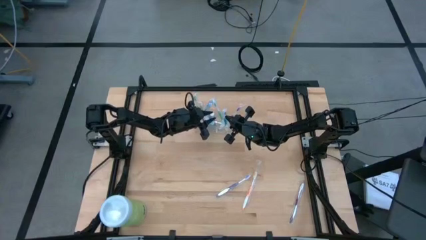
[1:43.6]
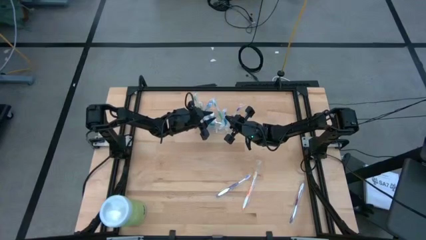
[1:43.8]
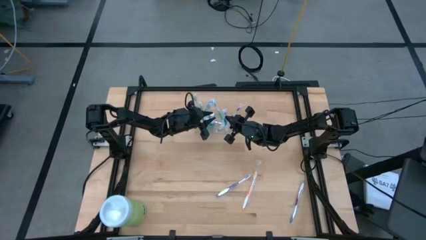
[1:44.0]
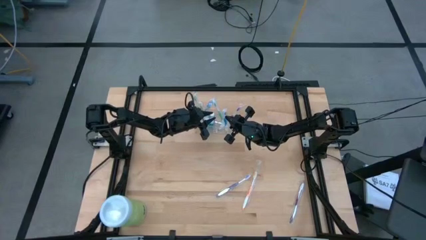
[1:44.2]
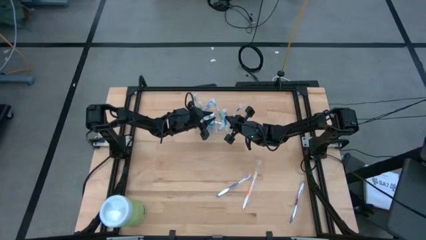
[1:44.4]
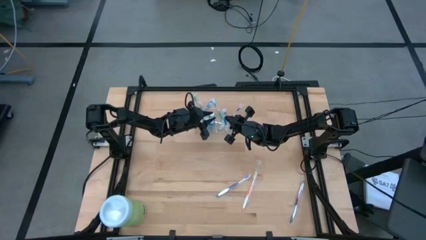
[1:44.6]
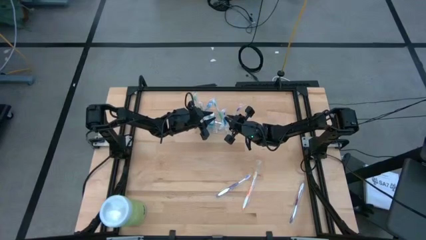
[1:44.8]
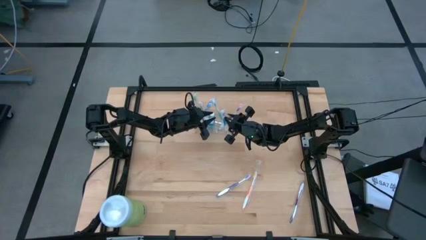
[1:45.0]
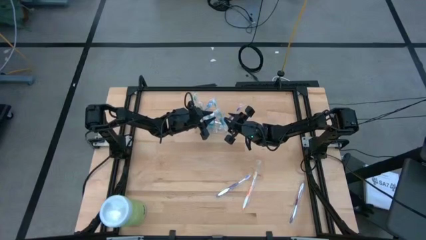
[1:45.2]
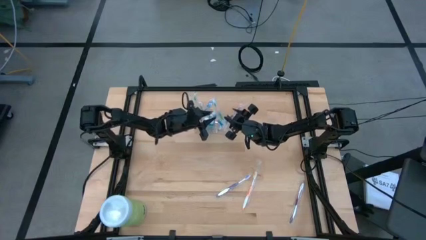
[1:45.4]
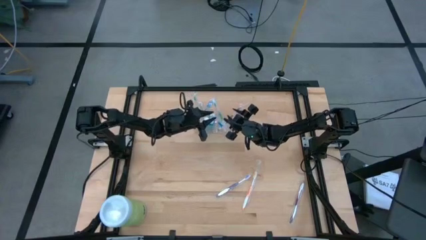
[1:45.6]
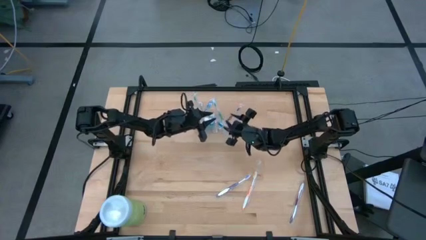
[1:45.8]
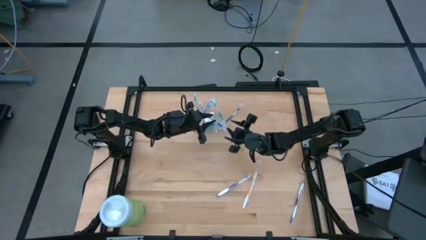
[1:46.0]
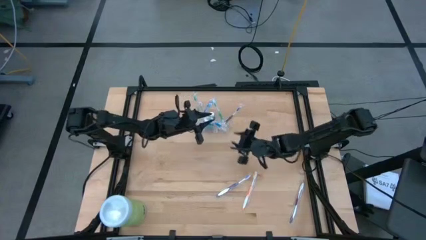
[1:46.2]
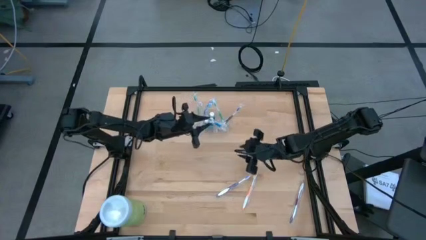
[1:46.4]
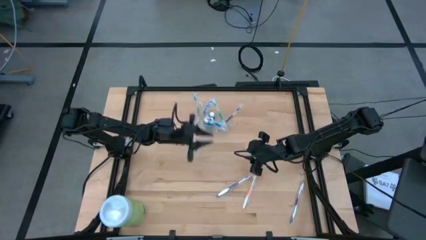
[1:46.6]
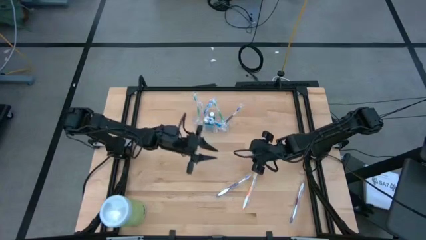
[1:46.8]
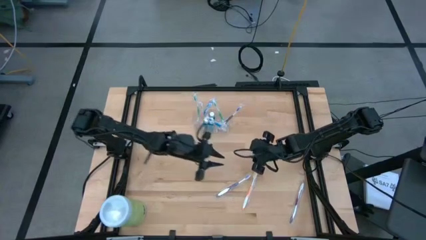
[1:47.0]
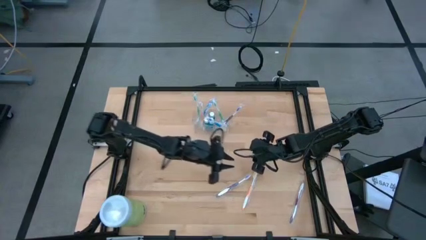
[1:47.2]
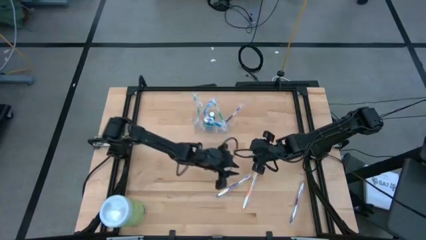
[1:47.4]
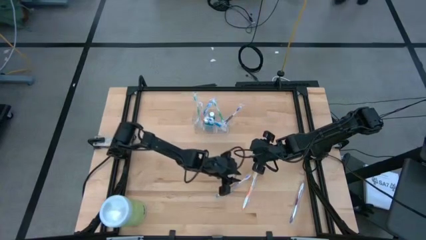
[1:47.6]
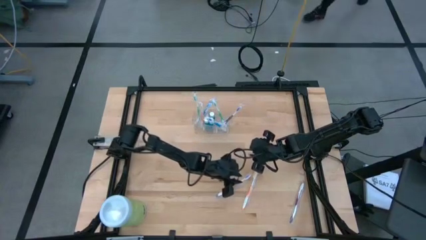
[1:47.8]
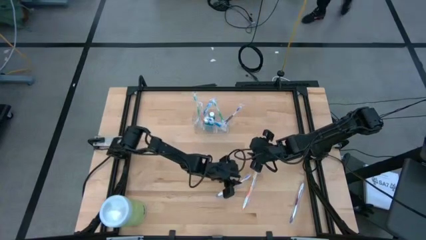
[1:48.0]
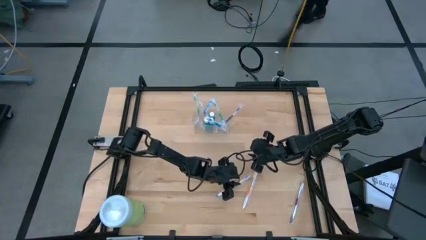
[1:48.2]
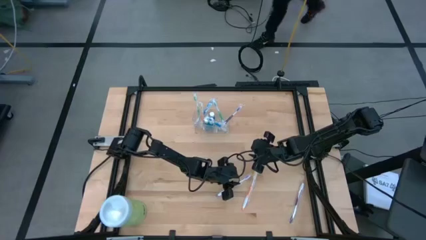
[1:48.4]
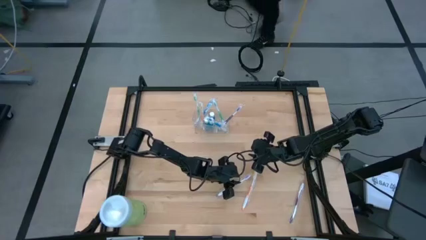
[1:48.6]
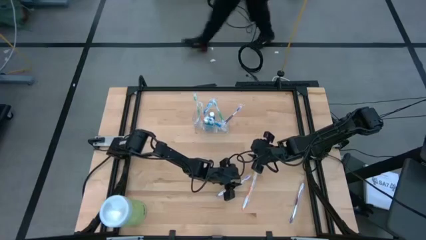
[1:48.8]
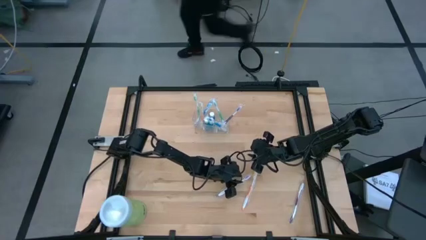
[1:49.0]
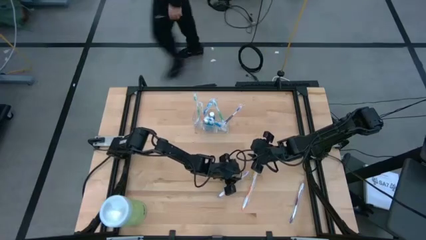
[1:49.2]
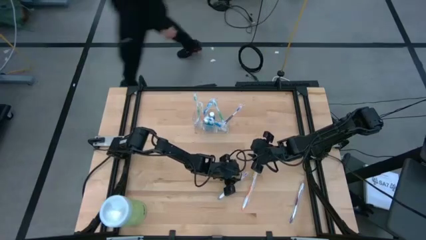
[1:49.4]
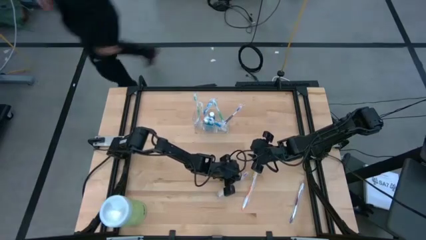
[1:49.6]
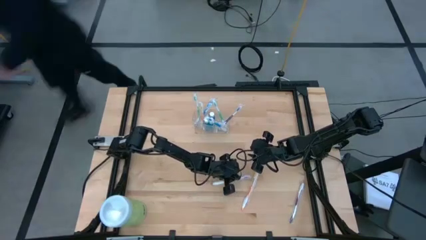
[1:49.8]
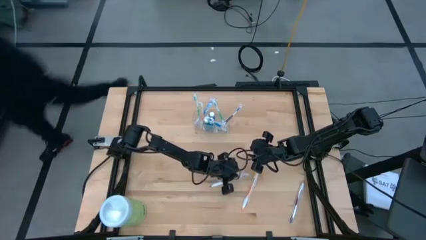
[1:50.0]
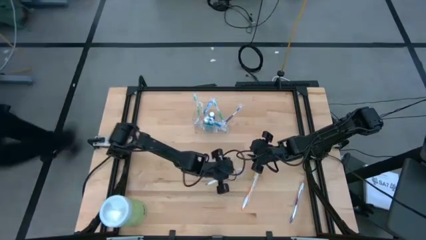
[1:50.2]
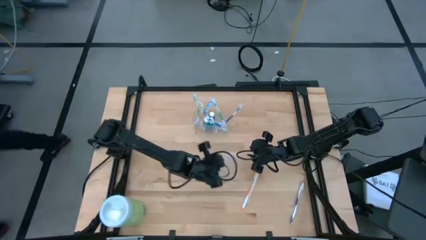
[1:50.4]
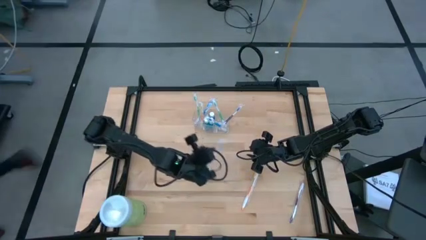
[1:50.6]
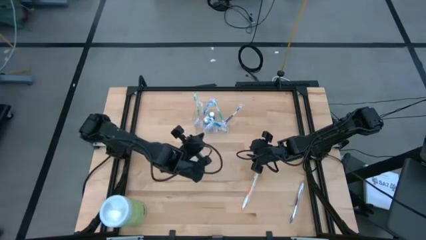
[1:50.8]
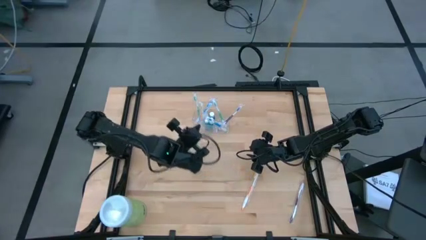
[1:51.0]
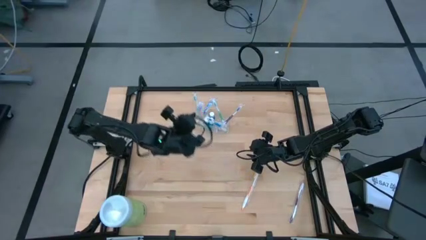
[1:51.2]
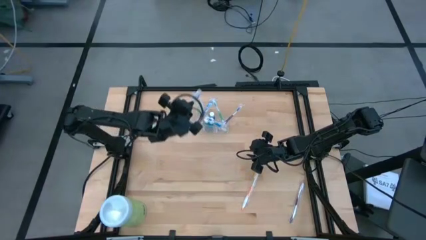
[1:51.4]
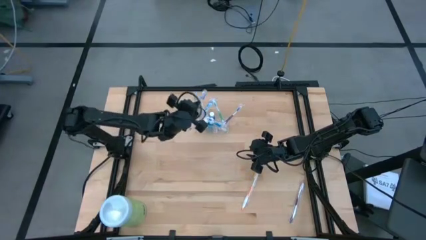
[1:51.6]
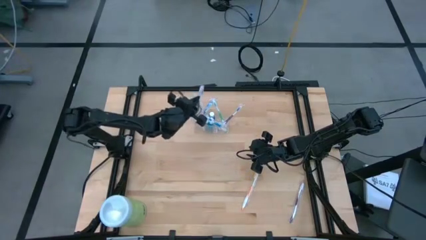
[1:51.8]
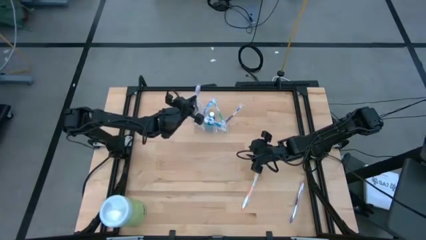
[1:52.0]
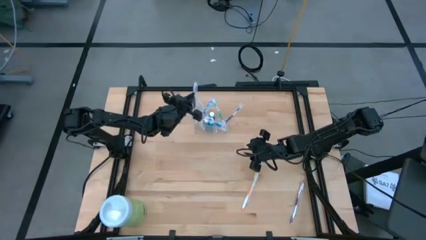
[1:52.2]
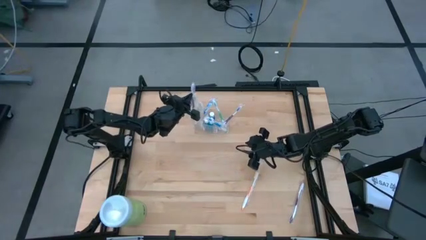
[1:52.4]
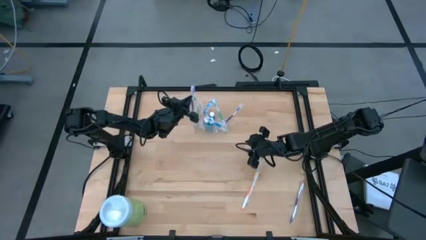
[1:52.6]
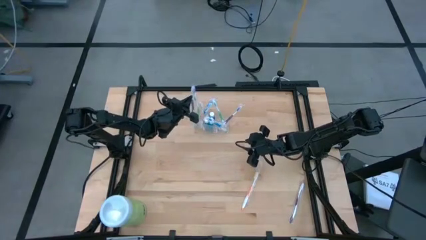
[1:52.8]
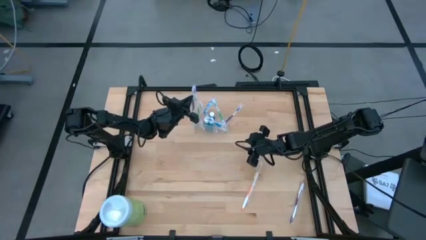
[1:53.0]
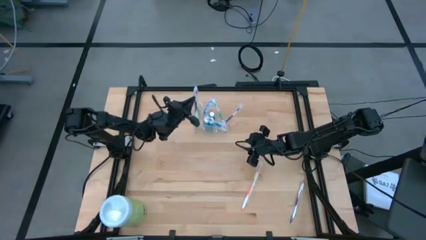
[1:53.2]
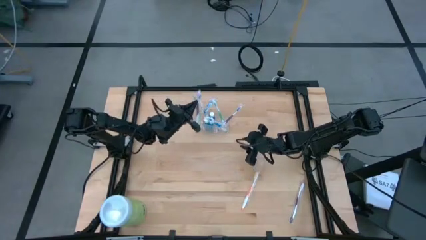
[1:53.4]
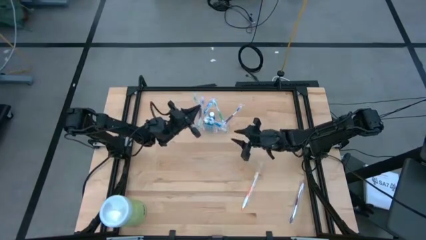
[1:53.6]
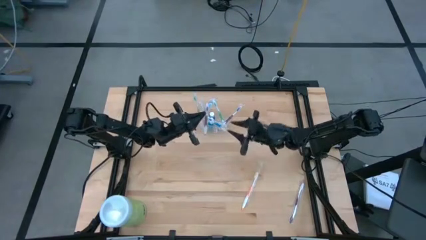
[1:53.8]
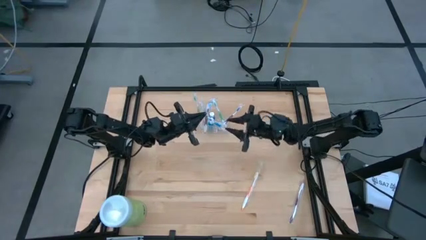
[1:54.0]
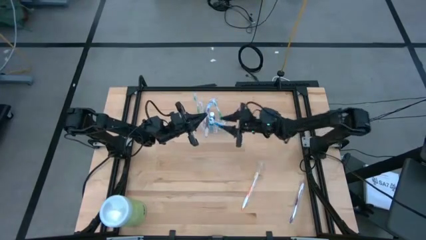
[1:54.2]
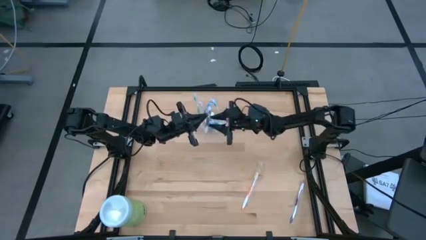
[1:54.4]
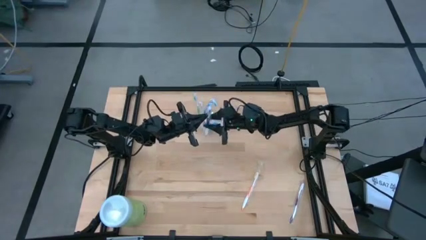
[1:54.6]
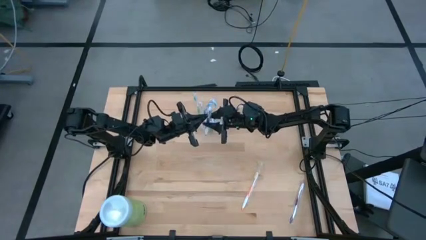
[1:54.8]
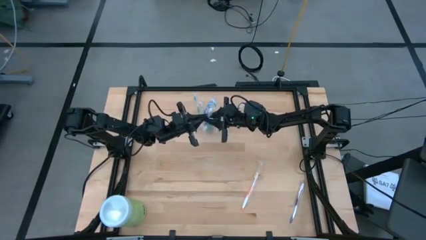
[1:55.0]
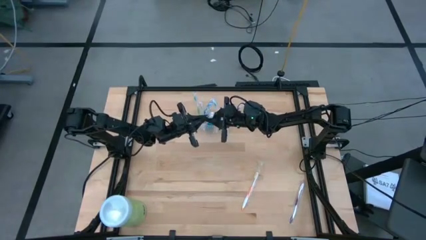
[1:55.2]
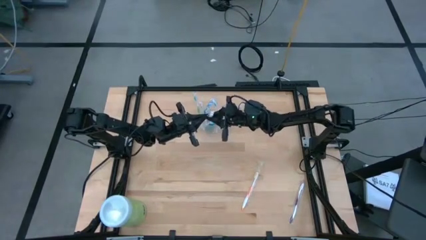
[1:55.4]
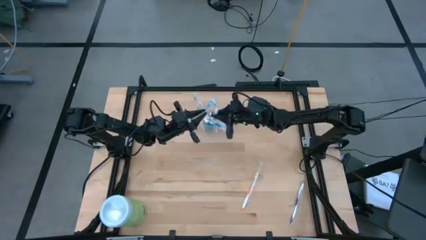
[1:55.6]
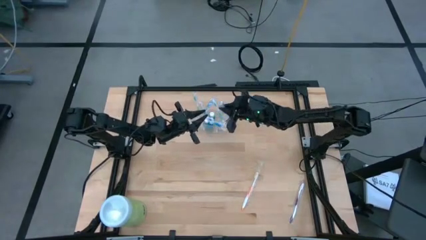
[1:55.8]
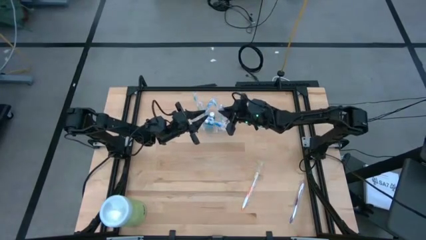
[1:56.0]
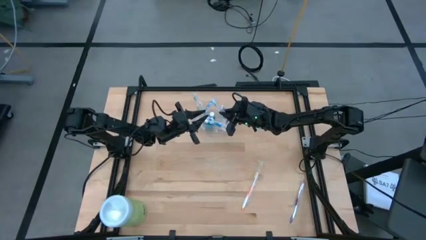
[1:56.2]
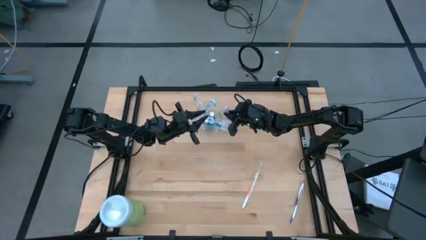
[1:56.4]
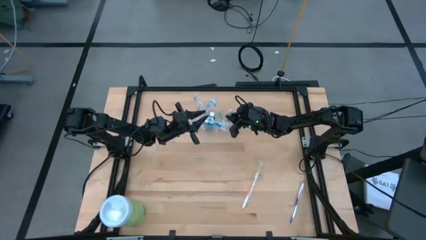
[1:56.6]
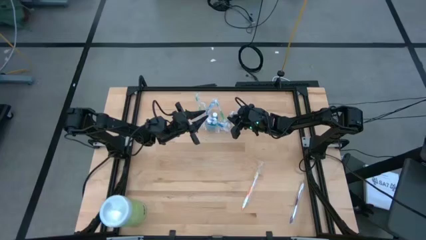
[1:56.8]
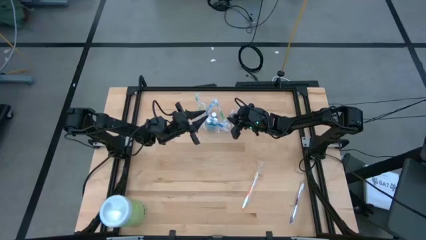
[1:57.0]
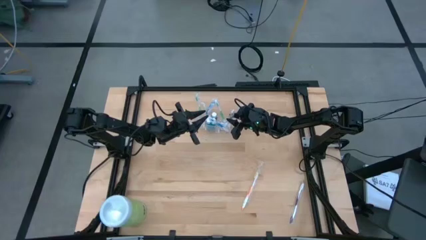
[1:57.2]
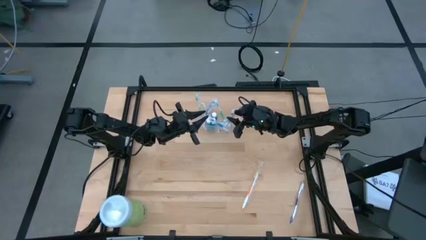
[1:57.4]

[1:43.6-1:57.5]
Task: Pick & Place toothbrushing station
Put the left purple toothbrush into the right section of the transparent organizer
